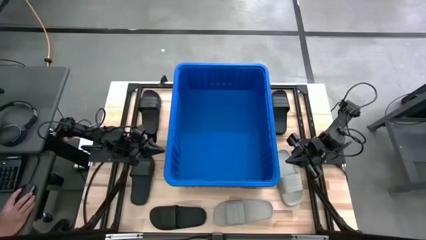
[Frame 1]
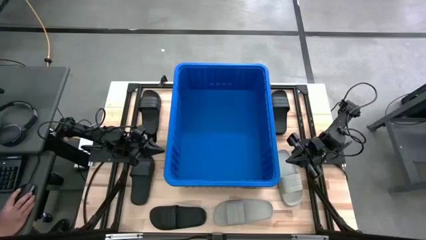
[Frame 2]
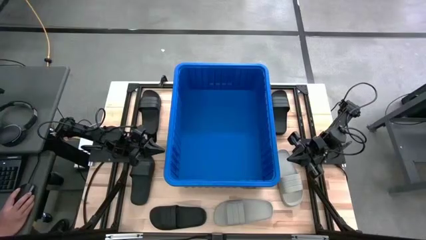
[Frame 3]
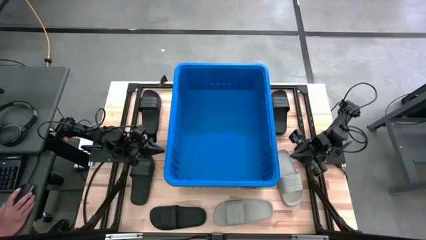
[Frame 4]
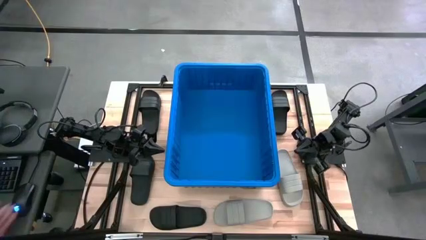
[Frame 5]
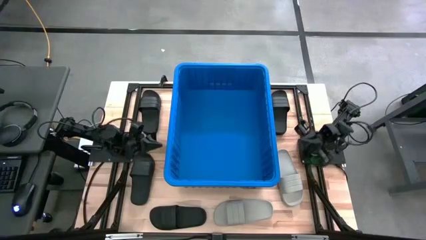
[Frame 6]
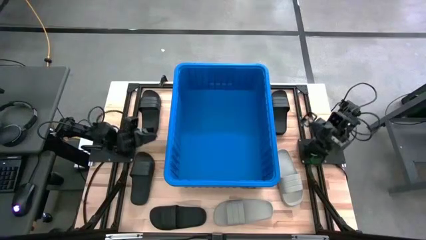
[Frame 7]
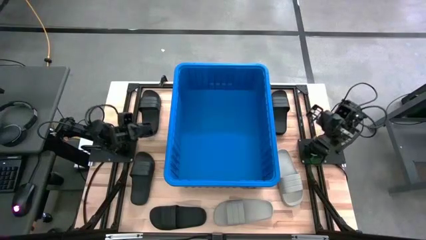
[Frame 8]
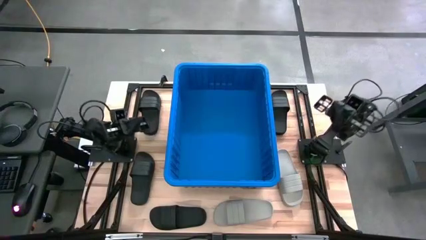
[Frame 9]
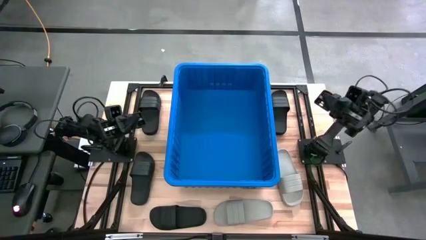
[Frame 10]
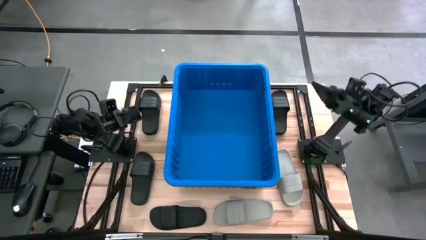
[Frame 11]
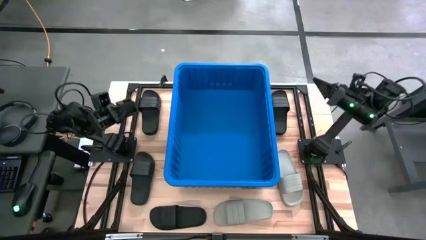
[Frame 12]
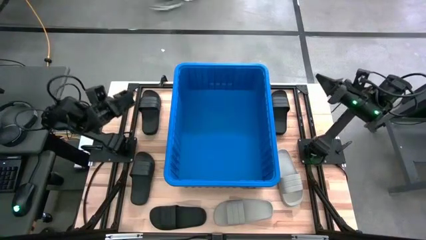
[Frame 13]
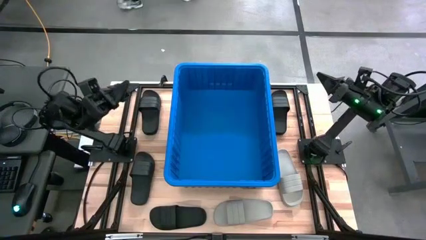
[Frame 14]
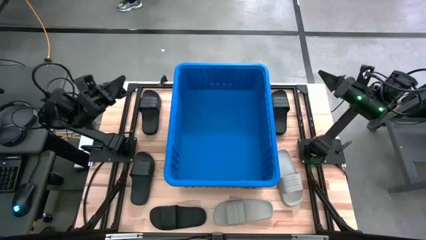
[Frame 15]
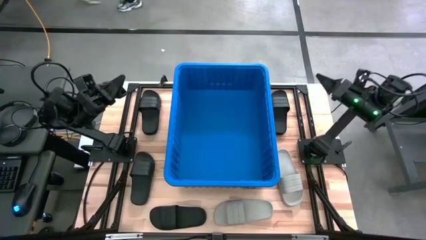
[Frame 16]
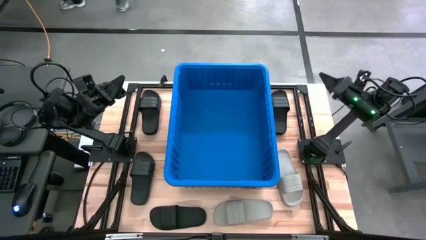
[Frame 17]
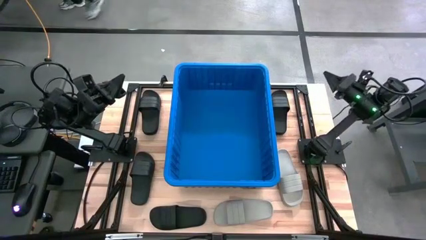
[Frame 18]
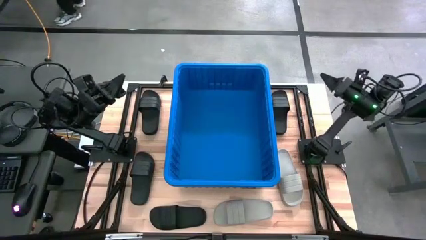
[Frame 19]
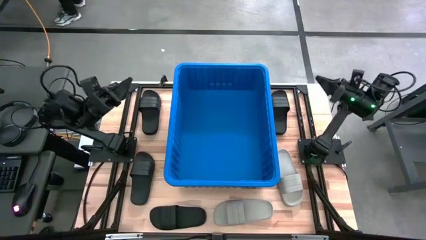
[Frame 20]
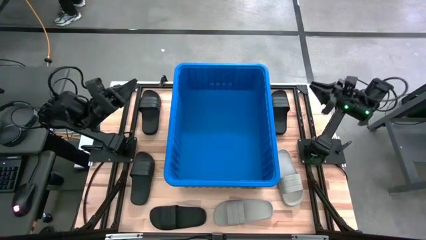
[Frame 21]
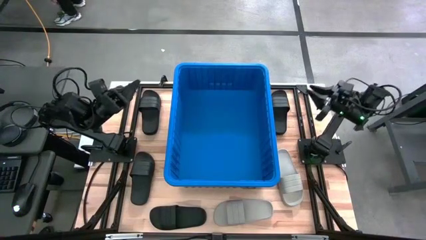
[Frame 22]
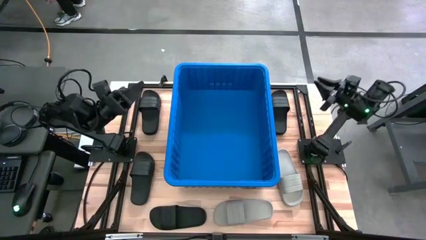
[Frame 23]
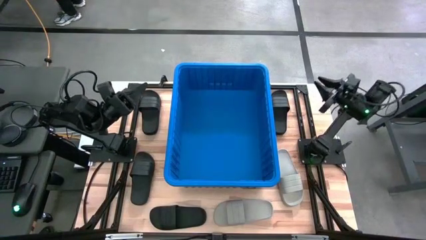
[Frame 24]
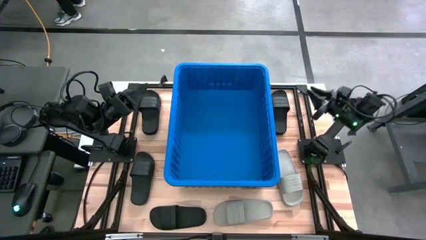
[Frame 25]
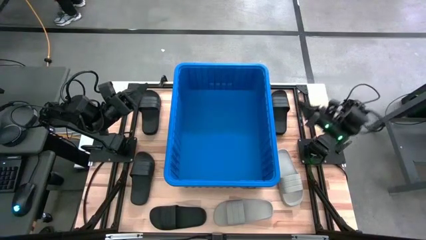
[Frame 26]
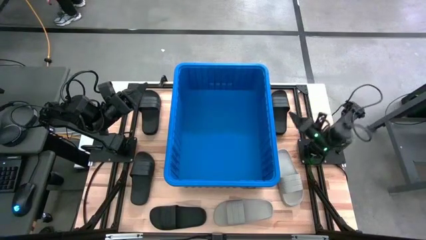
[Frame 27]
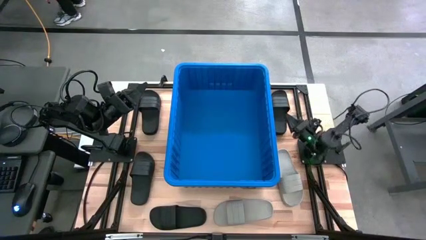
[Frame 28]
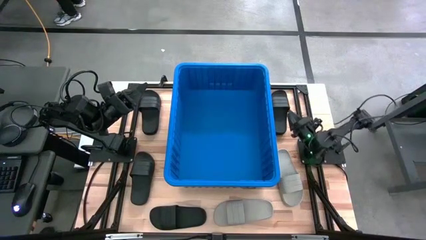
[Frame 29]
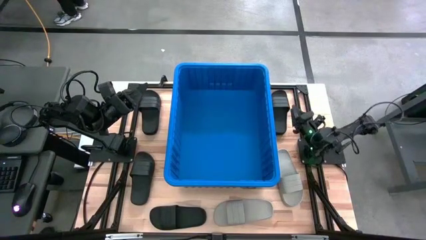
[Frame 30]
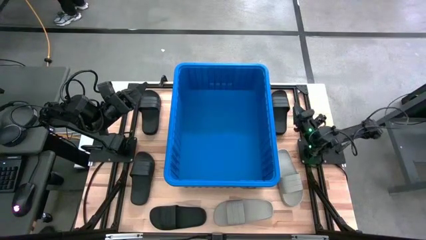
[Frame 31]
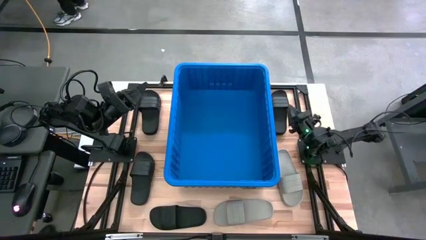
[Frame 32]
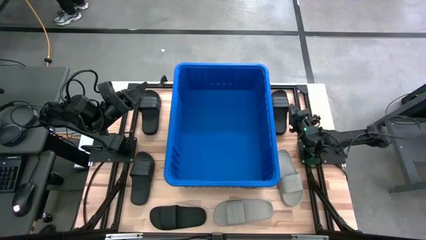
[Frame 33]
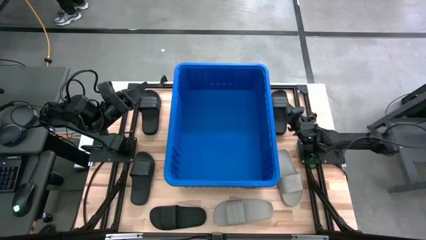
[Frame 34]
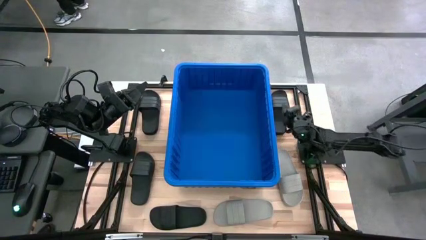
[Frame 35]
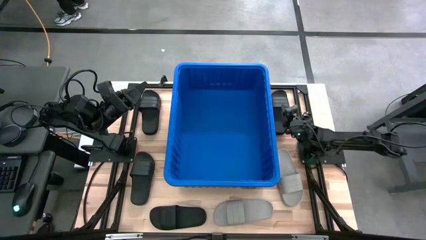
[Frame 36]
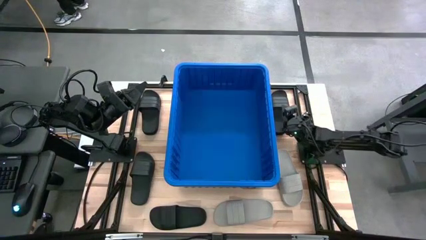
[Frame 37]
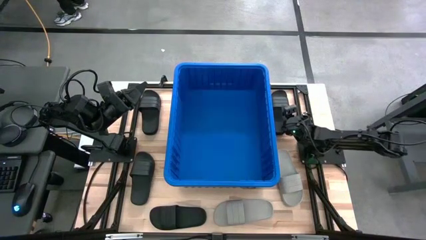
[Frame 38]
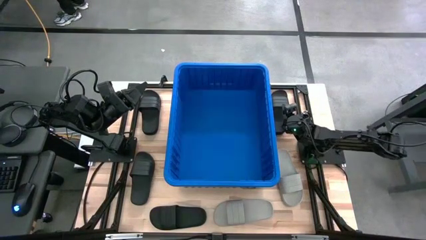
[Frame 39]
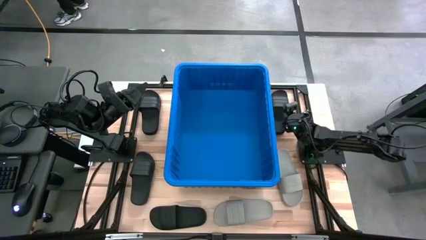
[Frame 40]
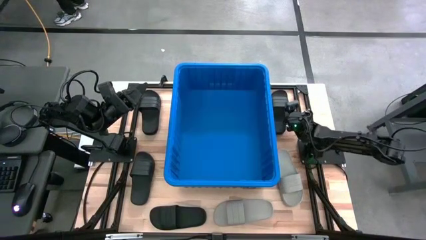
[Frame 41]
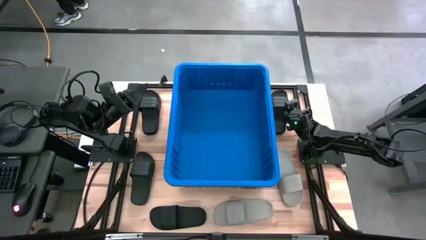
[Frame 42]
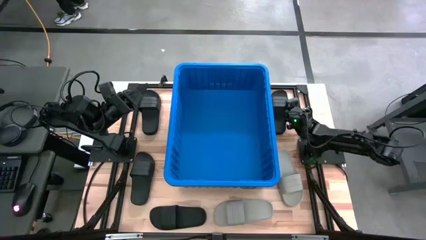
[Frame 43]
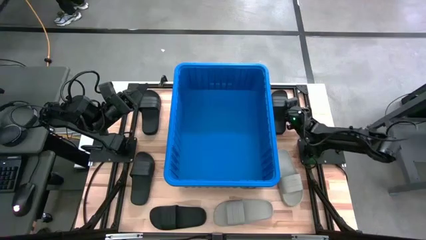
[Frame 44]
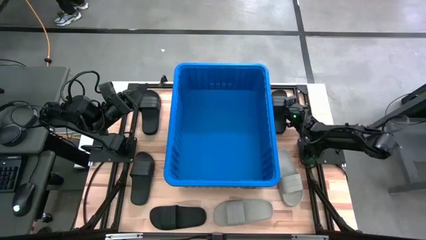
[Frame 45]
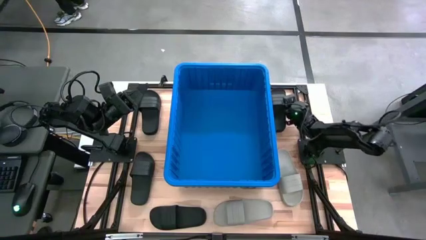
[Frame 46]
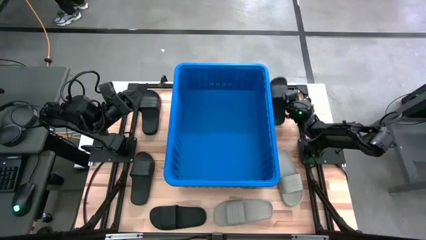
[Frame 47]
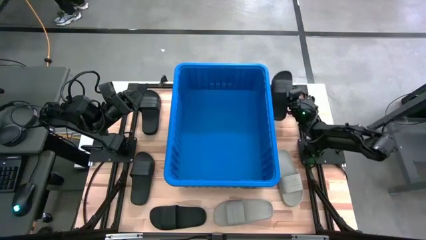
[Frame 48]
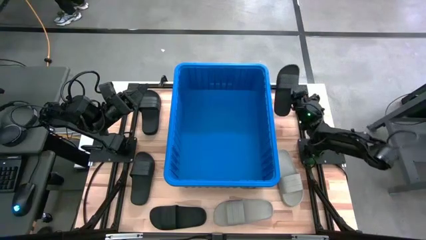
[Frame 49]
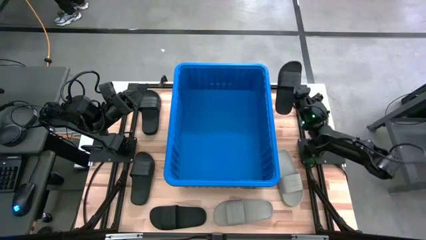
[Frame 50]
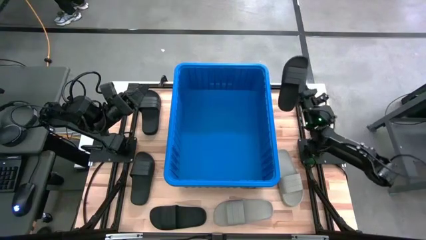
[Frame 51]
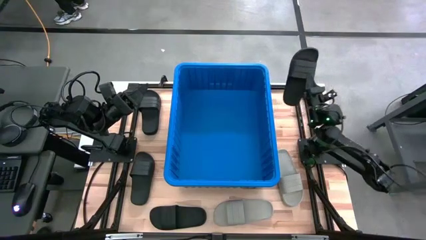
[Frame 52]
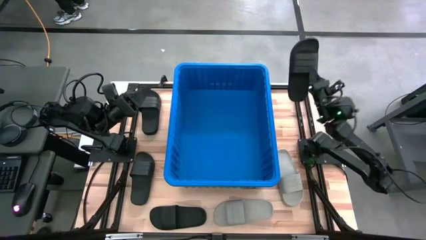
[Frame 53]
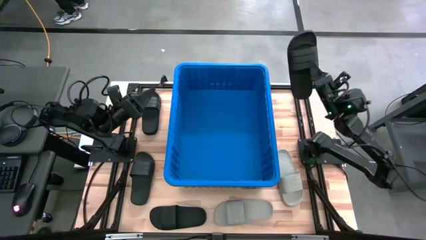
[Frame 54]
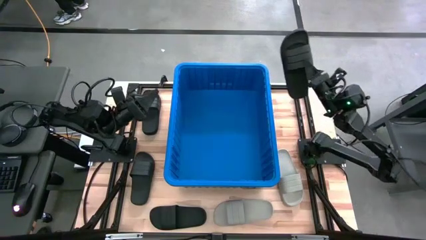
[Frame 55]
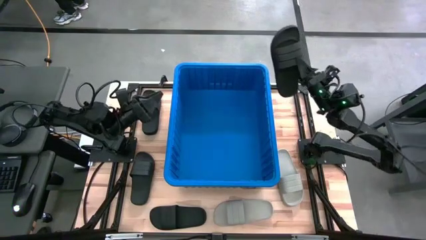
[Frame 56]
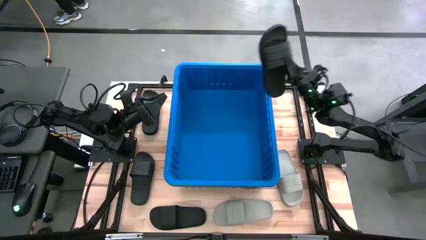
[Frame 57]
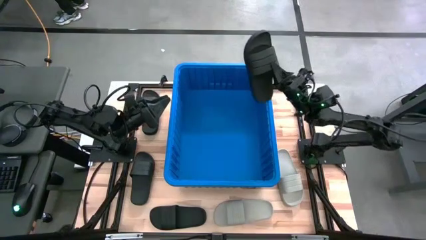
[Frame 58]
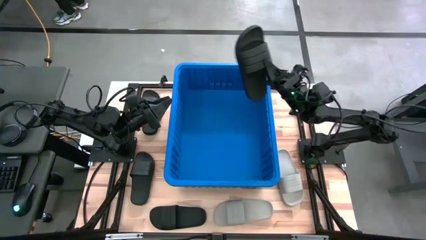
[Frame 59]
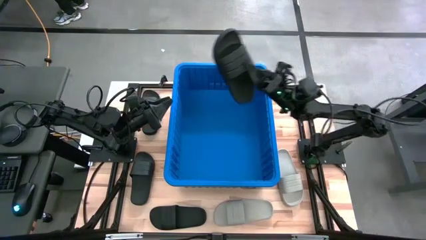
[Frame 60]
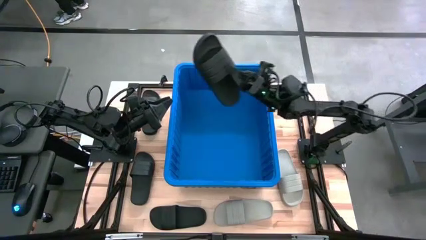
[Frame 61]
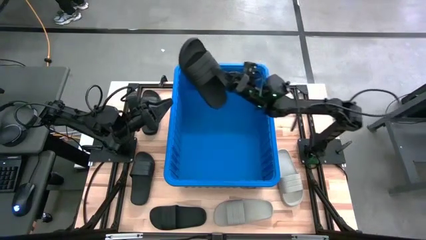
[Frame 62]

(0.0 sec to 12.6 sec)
Task: Pick and place slides into bin
Put the black slipper into the bin
